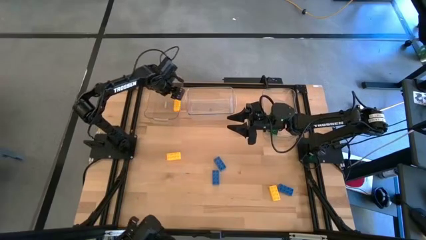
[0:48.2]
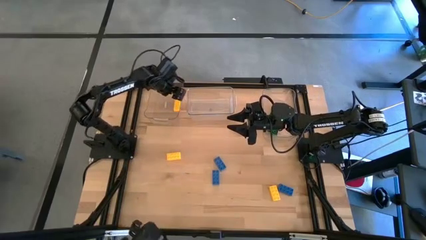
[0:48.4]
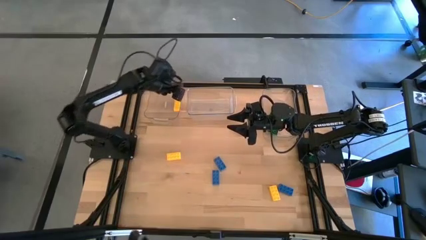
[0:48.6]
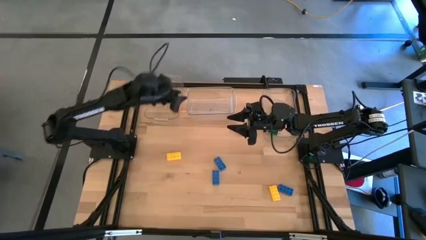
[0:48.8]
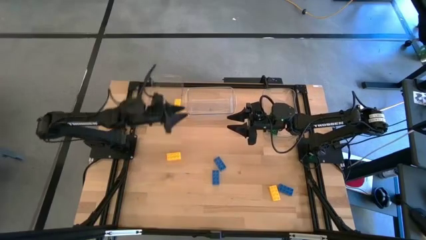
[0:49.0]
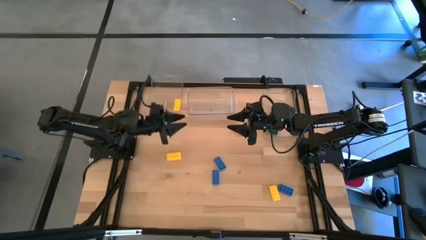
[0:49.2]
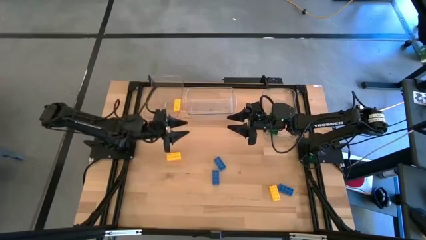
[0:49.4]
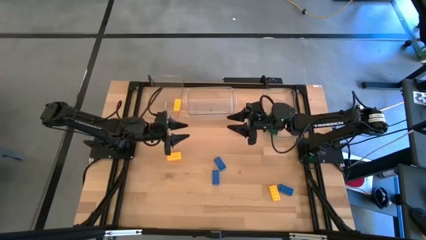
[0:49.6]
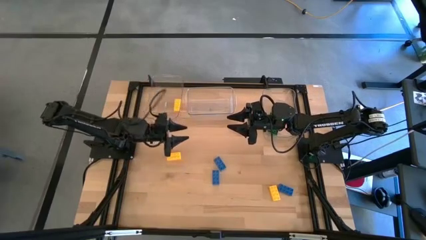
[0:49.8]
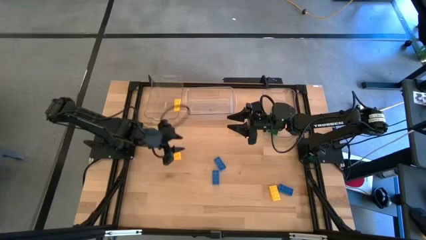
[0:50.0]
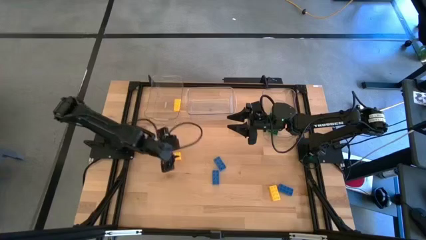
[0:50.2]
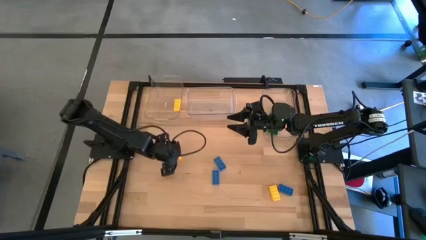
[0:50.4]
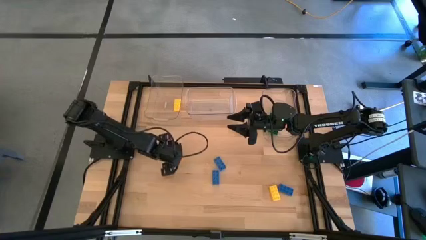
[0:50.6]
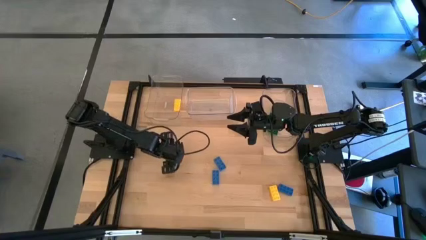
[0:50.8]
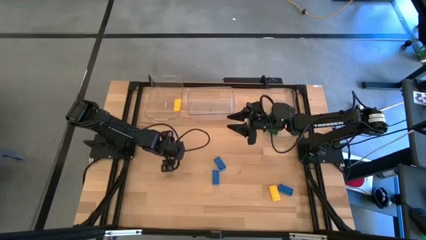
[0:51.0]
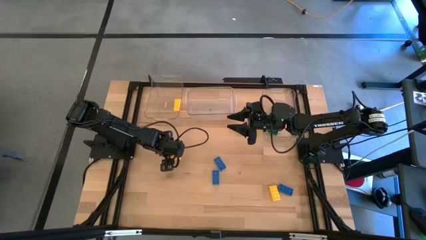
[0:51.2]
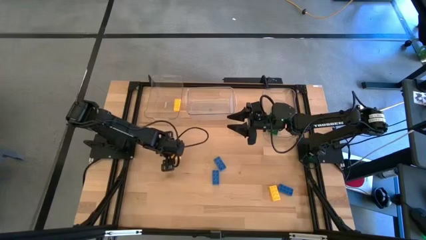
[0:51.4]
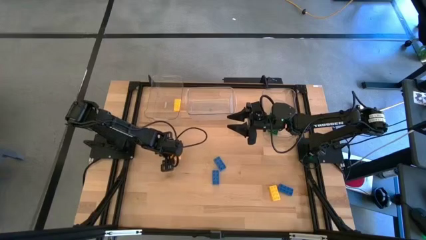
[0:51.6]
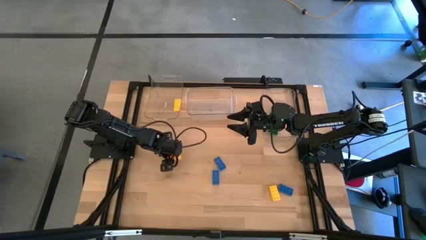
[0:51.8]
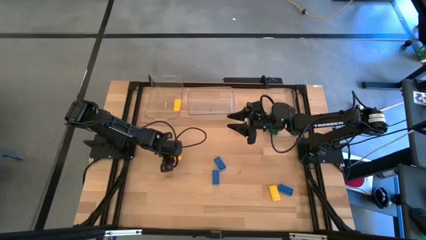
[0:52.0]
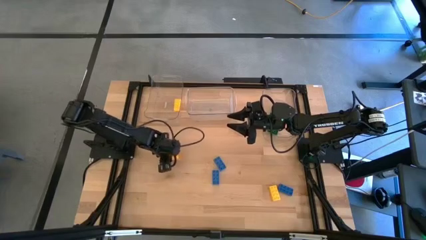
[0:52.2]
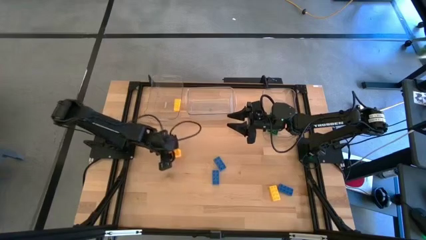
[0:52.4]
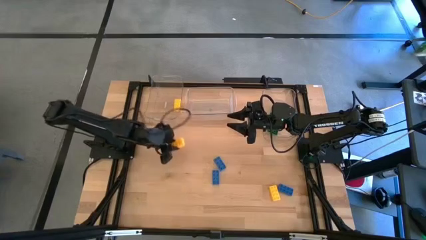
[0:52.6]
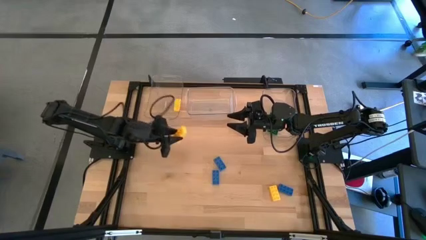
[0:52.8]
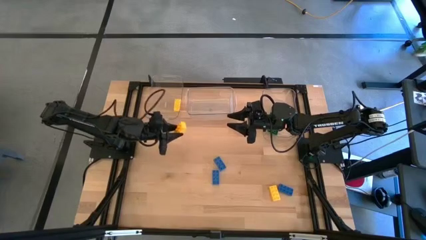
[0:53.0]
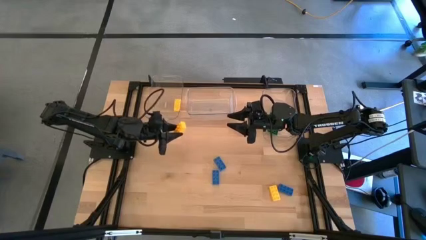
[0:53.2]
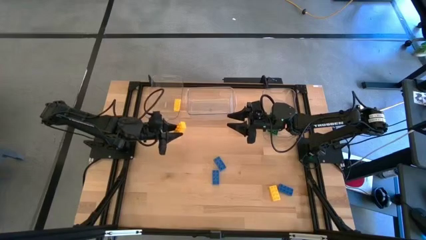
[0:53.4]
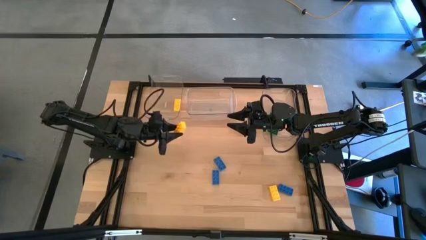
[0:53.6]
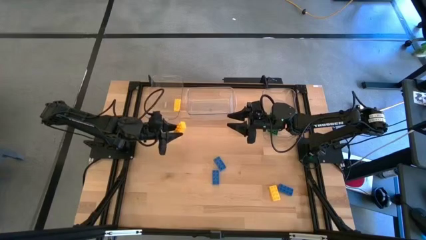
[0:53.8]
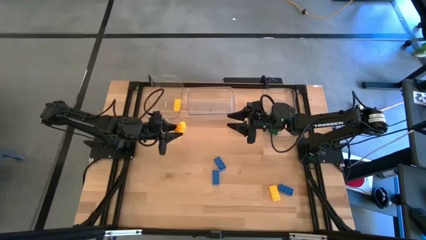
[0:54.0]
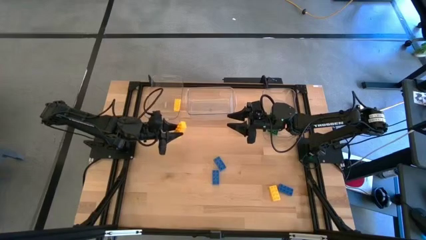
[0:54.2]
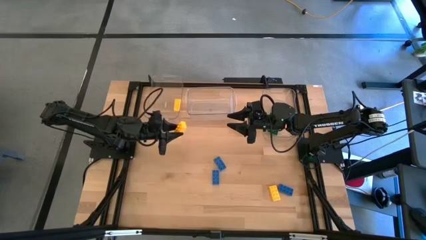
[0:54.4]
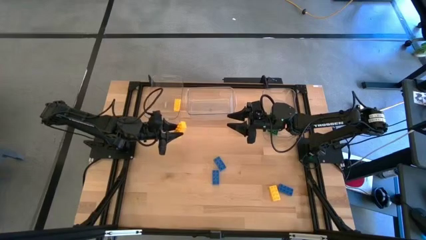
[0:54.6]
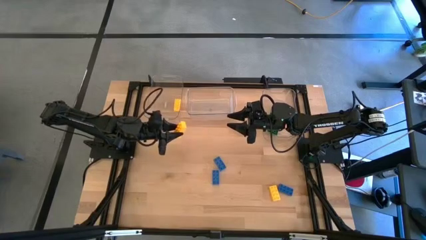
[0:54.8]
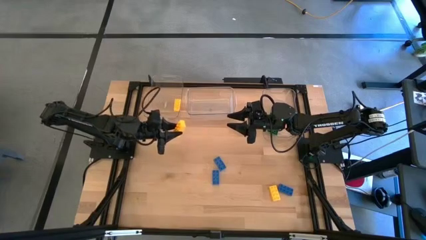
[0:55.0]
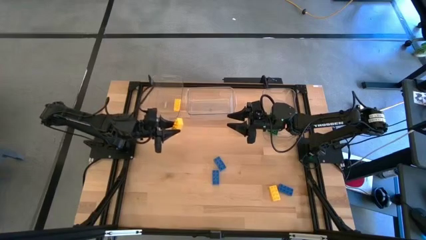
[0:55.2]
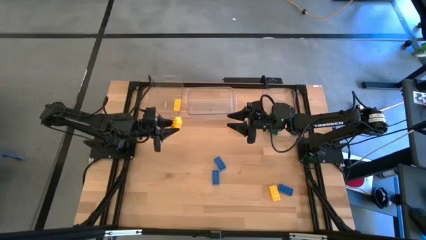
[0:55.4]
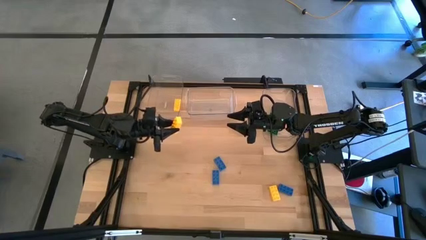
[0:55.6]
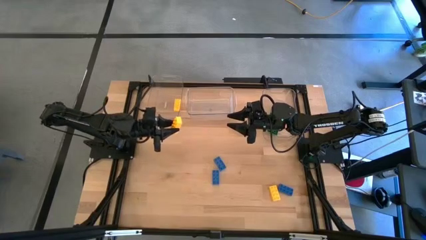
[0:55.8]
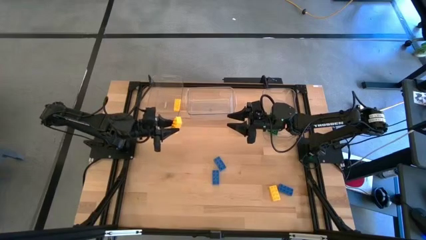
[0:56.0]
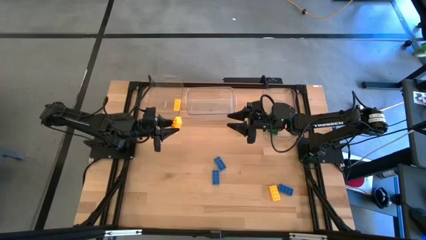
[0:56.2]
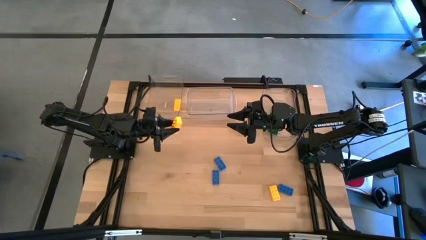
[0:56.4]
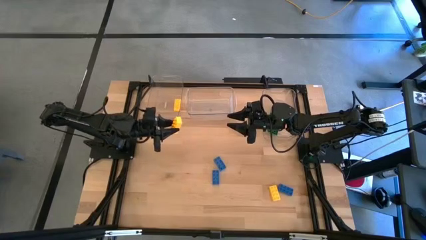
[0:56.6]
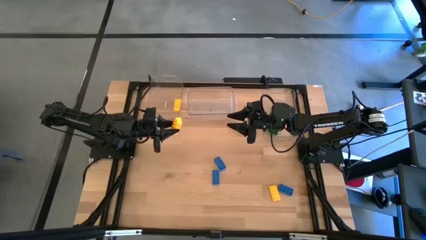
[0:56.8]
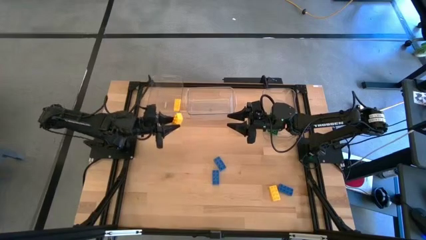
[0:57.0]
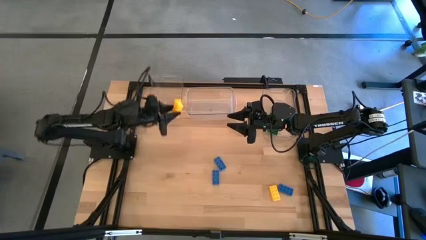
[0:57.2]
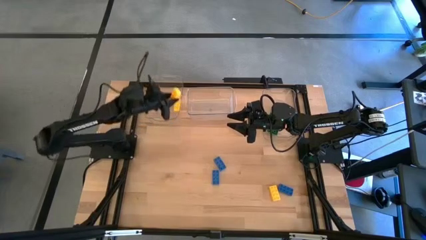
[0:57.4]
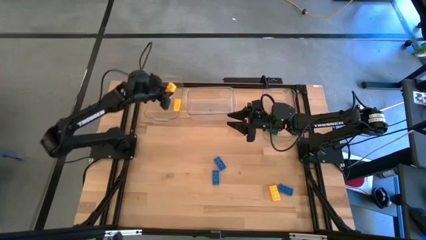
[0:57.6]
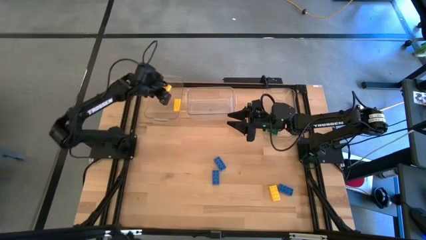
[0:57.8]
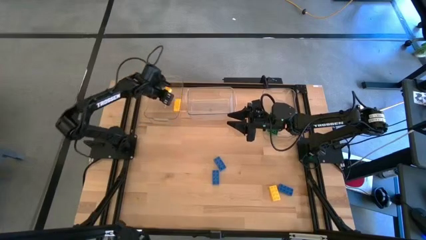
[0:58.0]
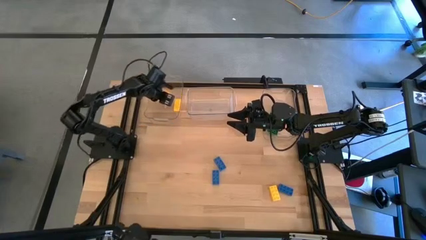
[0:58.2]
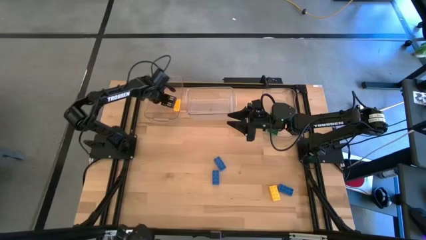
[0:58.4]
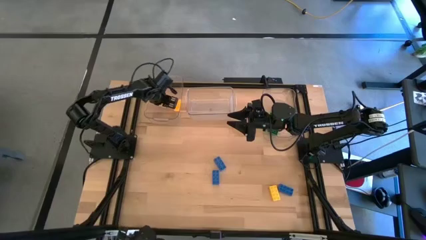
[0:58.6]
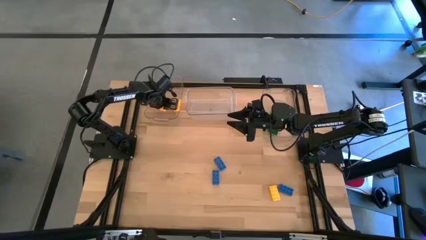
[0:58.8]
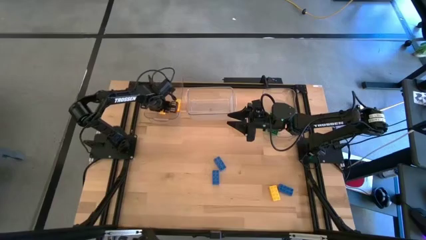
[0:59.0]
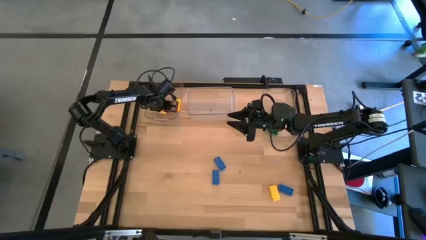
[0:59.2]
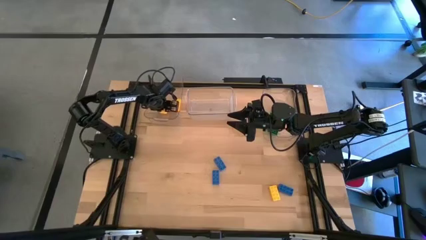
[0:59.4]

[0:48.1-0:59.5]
Task: Sort & place blocks by color
Put the left yellow game piece into the left transparent bin

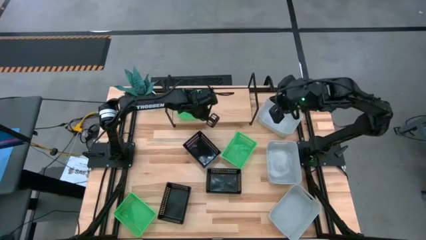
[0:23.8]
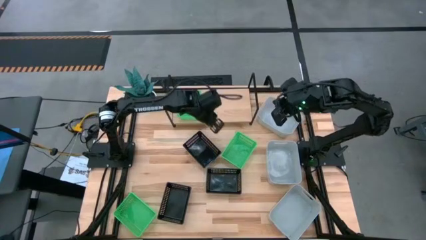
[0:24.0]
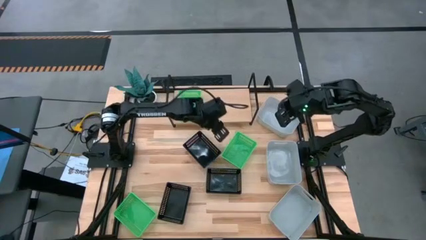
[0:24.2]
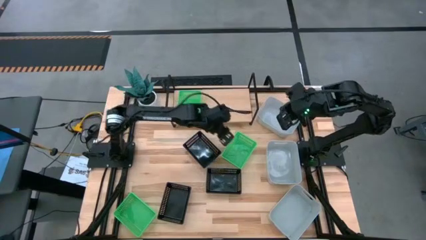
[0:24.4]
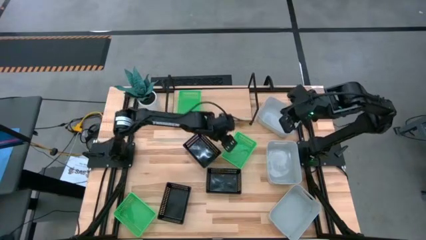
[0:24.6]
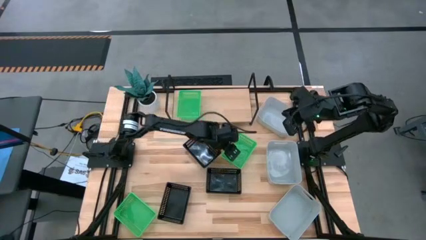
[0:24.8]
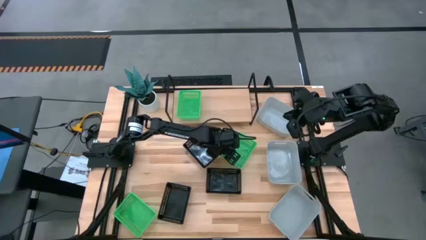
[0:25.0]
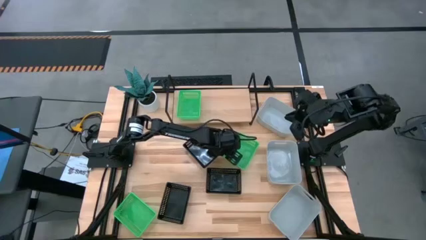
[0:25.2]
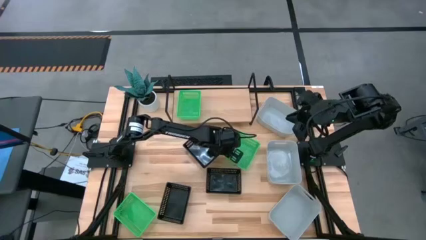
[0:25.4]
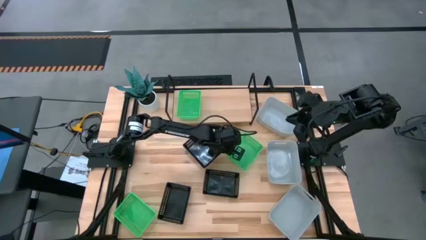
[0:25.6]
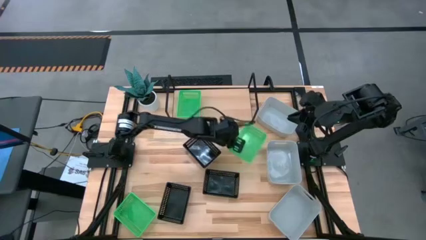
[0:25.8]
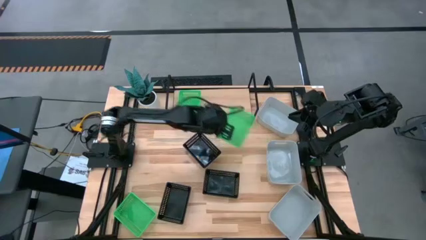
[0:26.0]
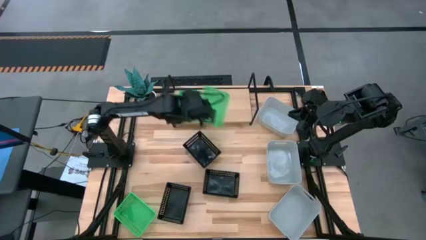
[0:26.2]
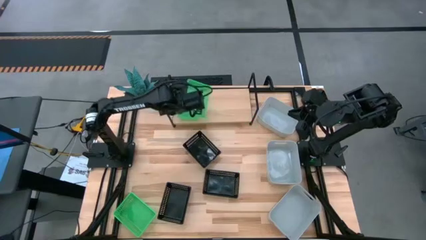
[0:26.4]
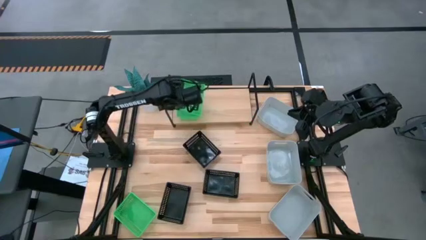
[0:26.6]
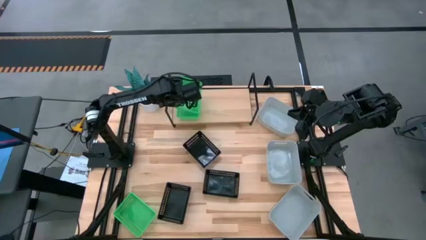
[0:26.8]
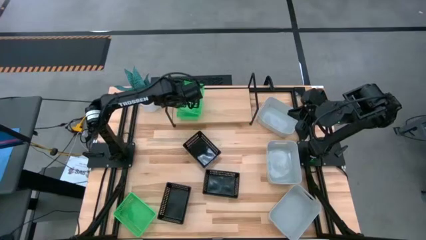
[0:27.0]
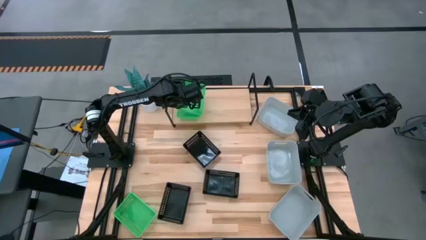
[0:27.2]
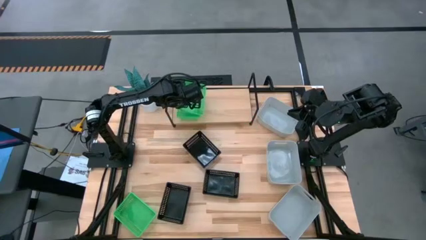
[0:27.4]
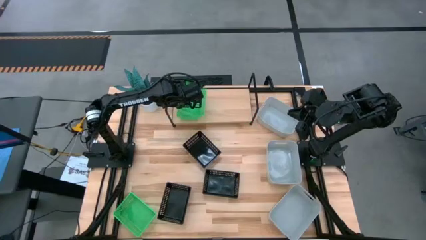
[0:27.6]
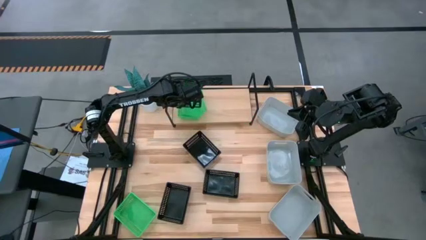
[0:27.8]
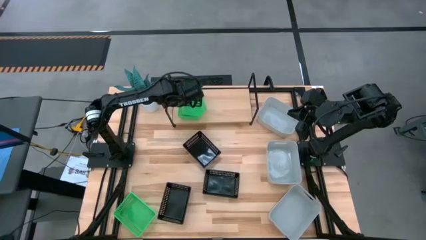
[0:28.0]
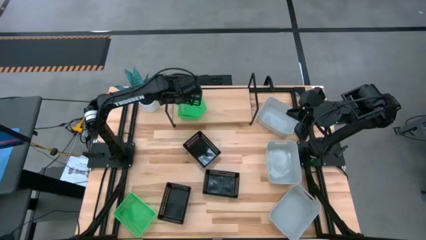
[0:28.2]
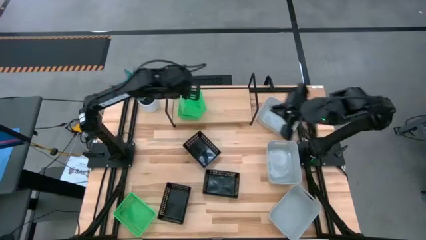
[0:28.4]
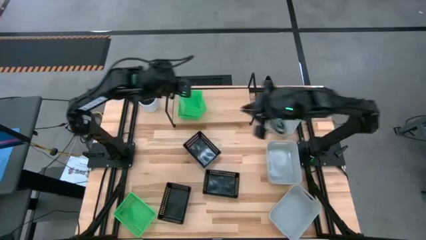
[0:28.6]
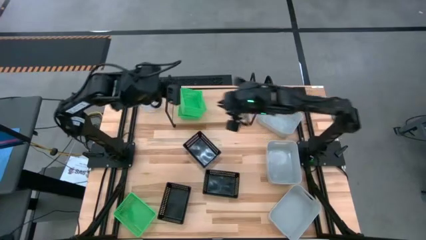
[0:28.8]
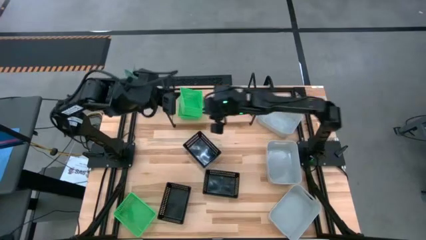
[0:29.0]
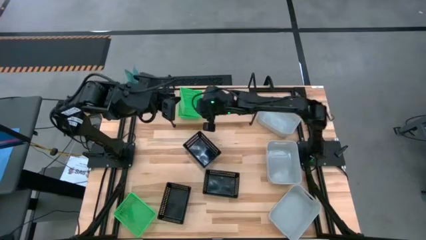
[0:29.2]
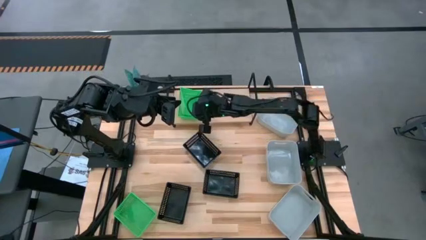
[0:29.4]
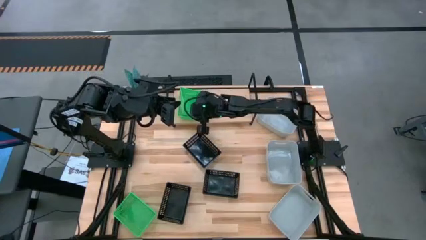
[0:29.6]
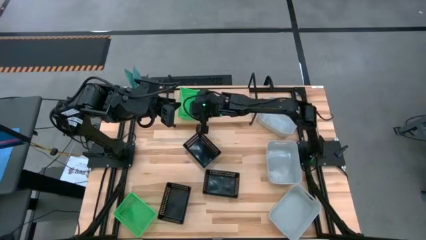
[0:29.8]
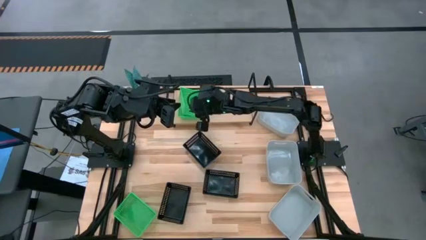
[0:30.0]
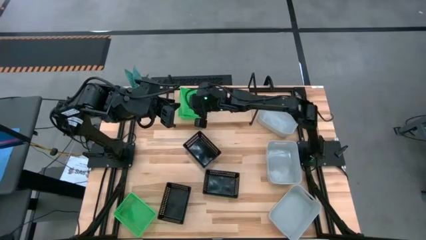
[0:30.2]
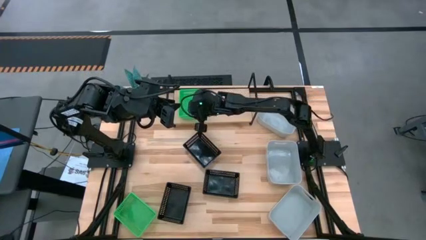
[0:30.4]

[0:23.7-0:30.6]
Task: Stack baskets on shelf by color
Stack the right green bin on top of the green bin on the shelf
